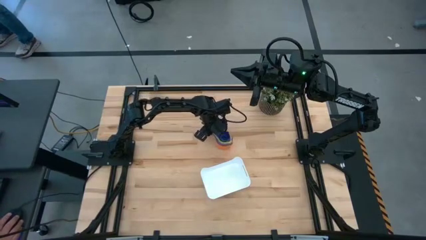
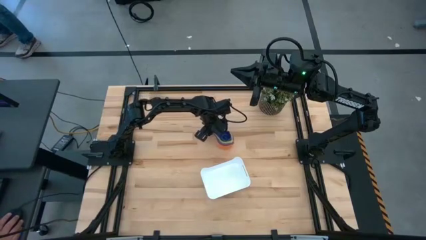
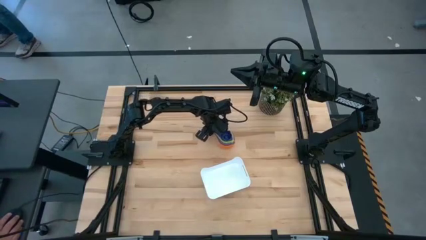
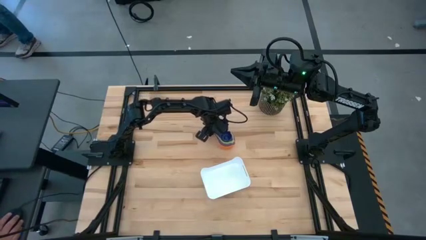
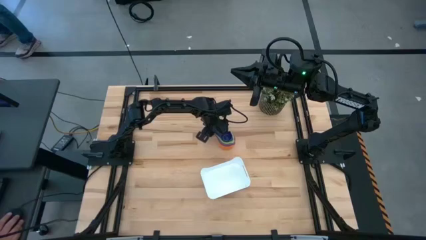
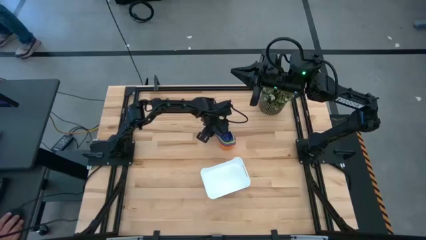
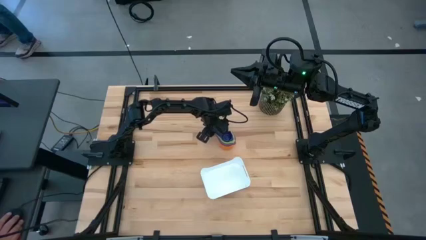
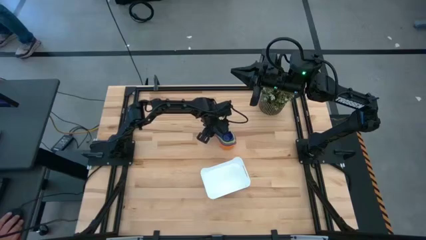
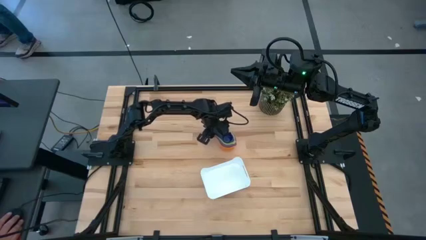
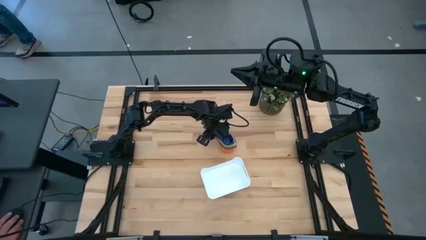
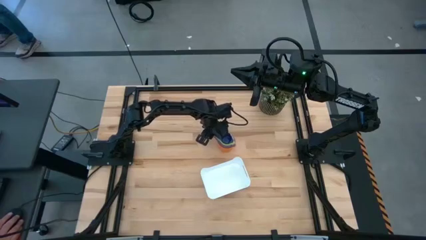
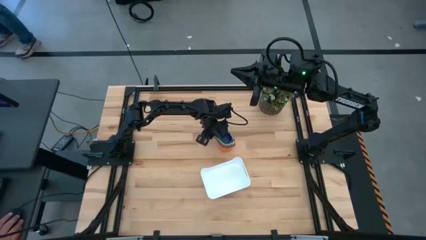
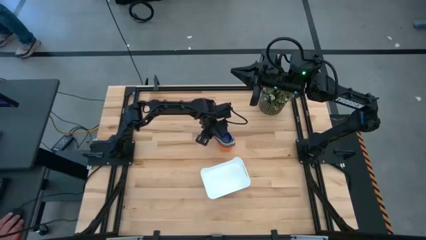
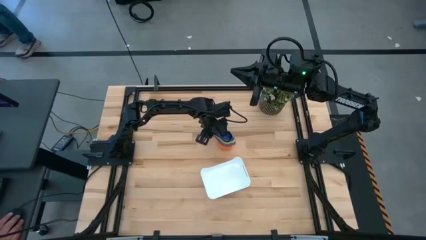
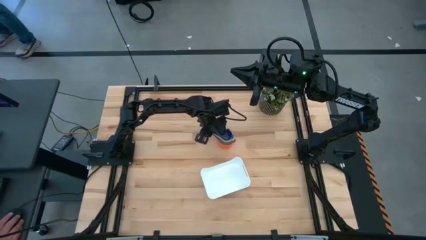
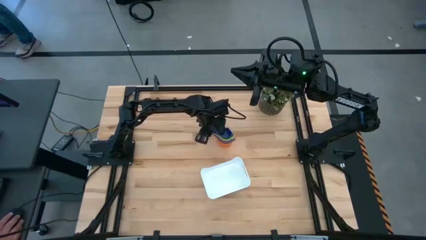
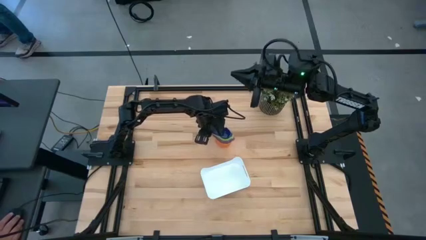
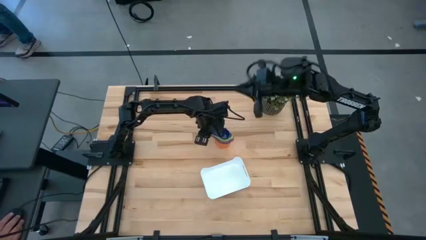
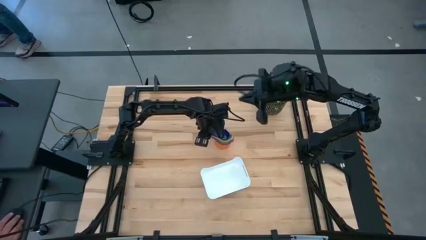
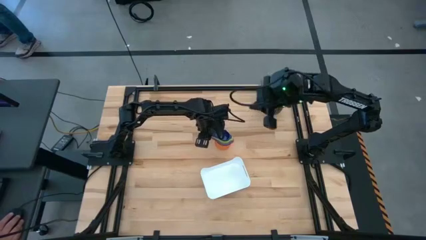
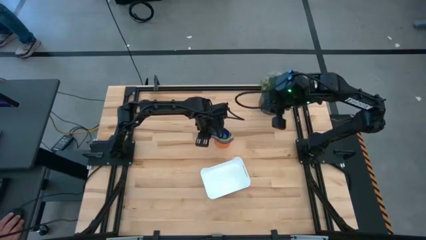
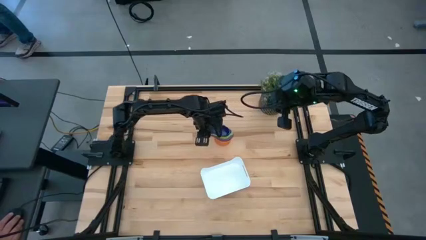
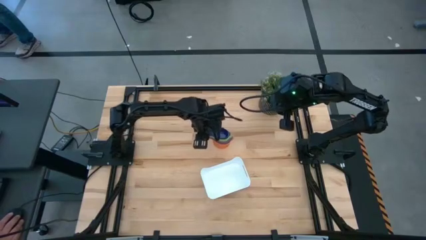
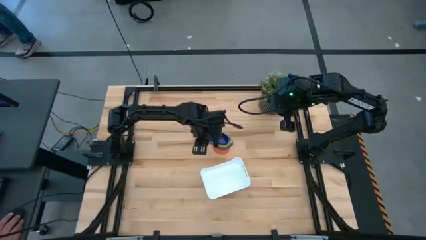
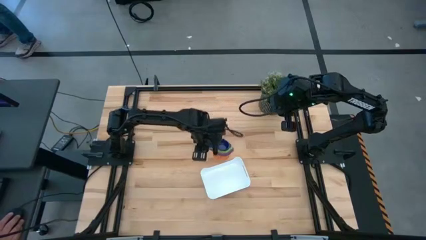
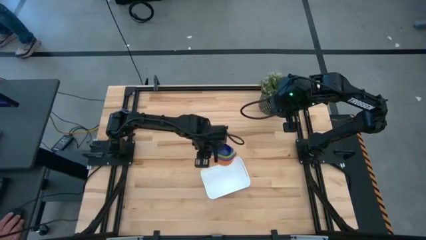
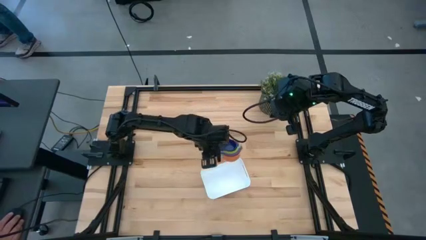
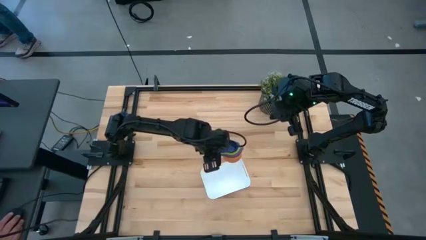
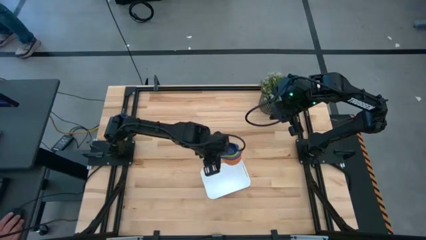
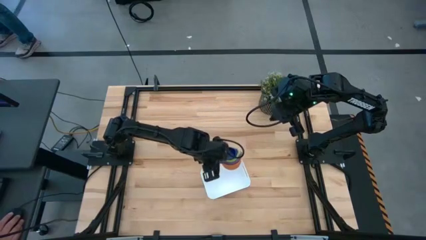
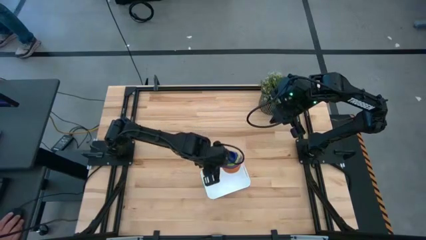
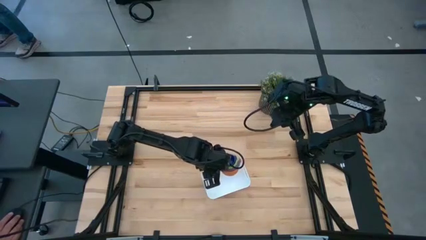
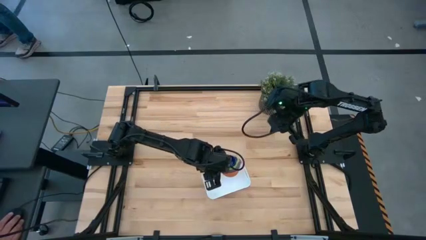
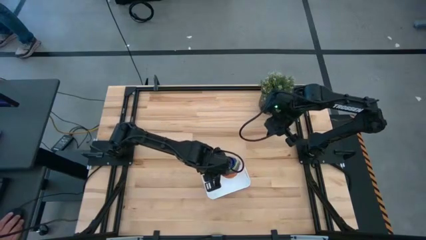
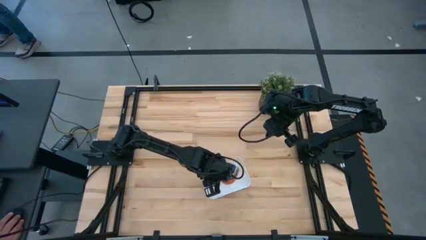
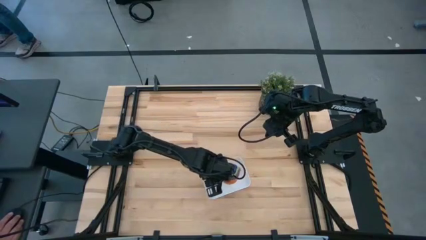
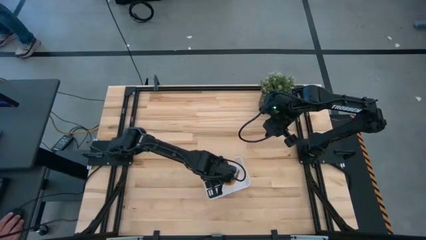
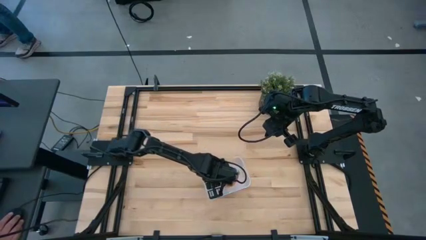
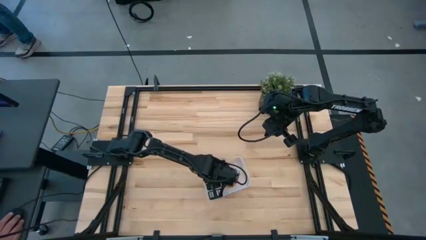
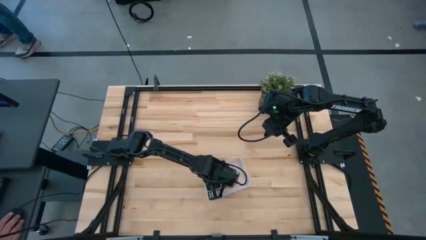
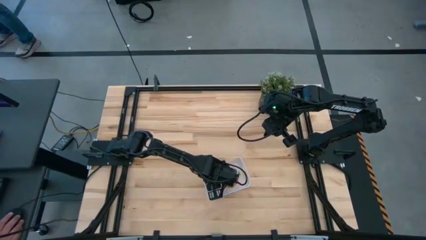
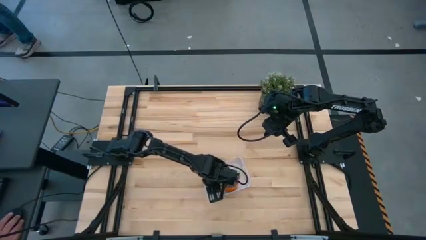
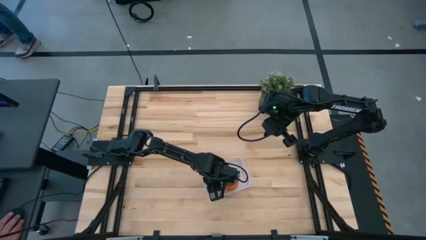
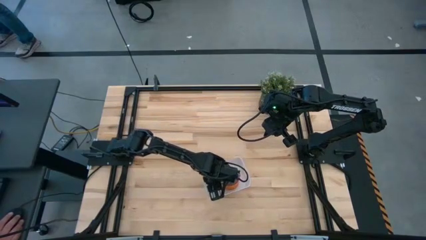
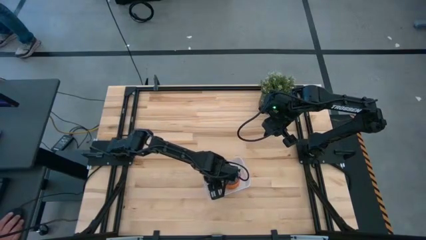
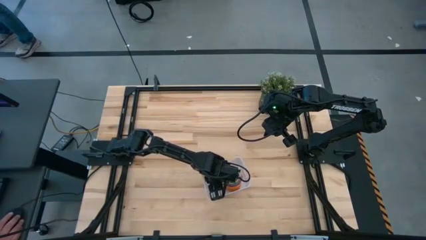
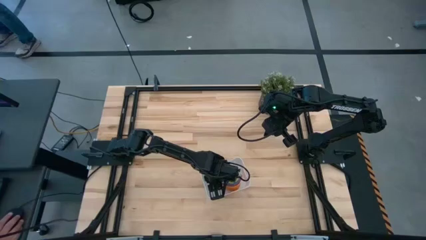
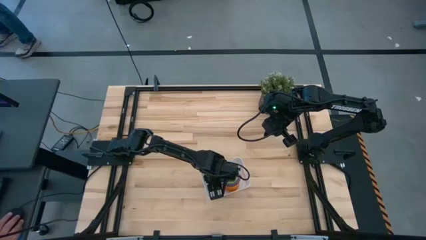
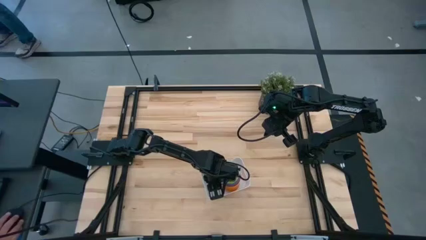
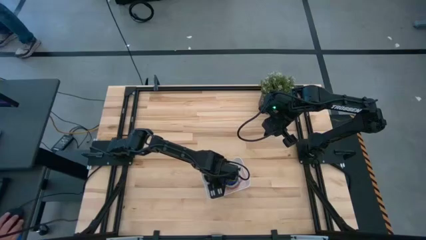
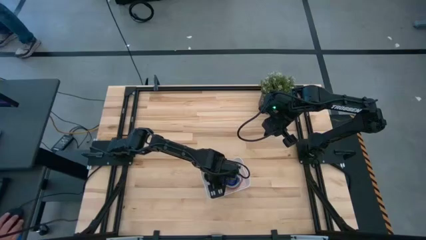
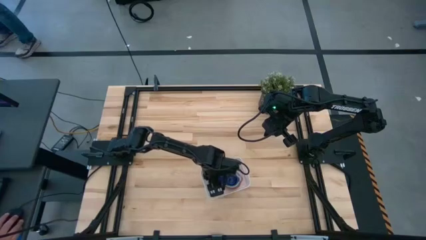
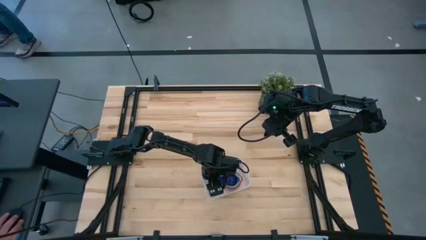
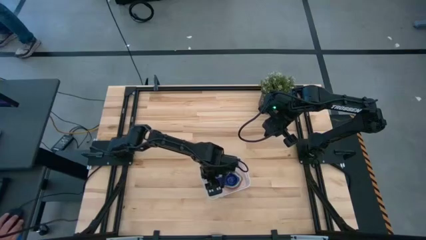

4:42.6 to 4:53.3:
Task: Nest measuring cups in basket
Put the nested measuring cups into the white bin

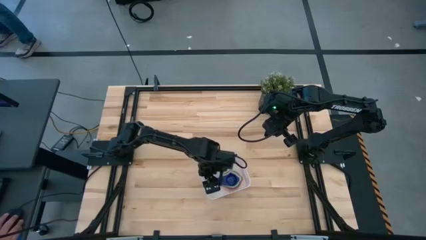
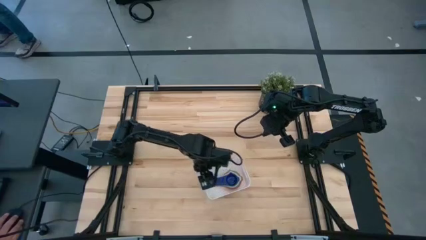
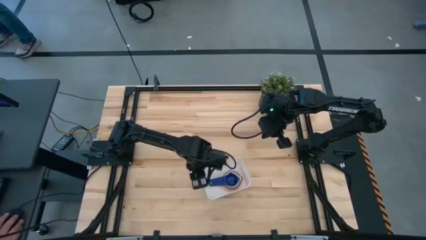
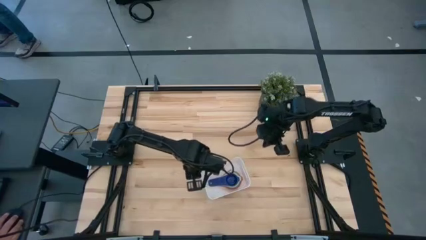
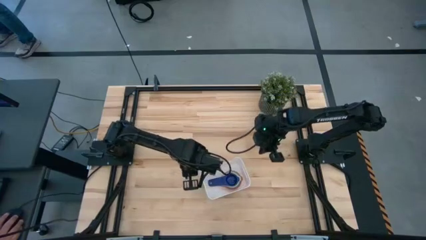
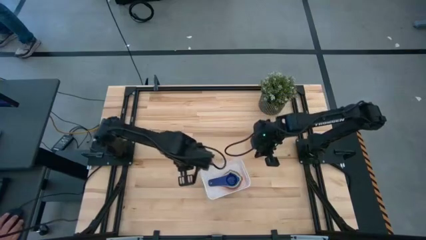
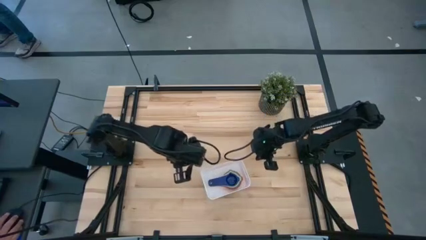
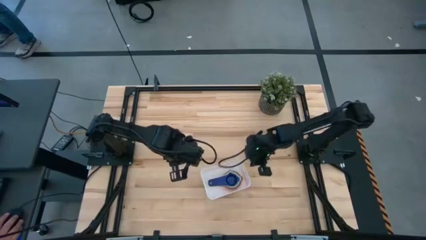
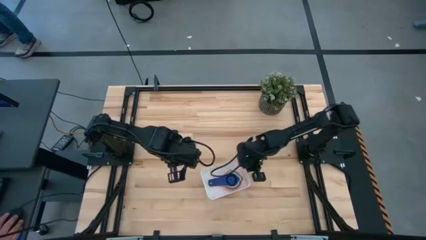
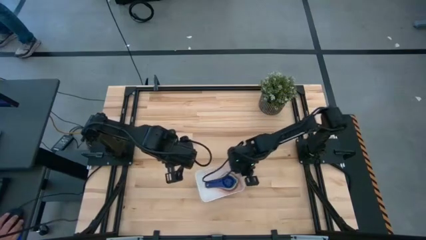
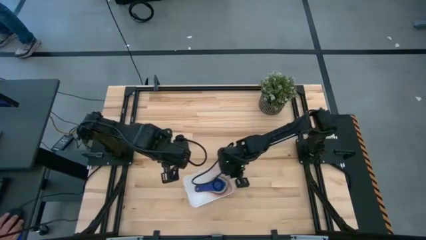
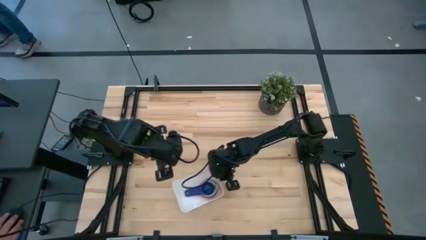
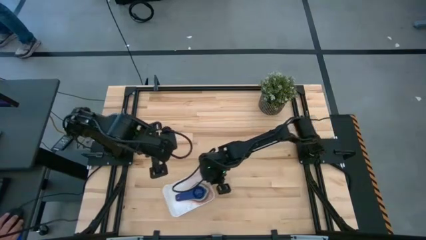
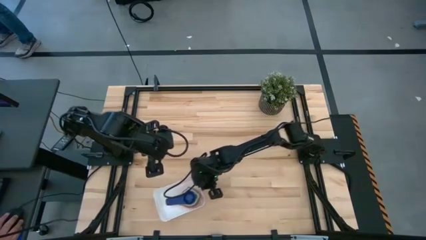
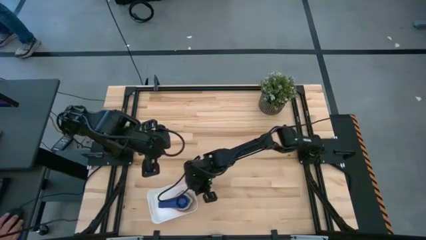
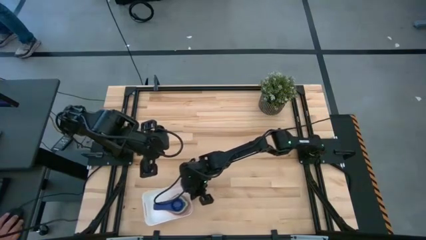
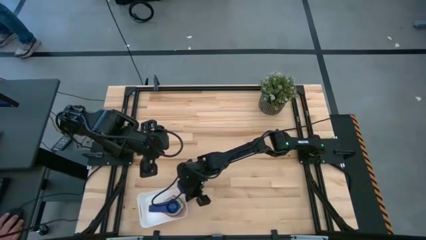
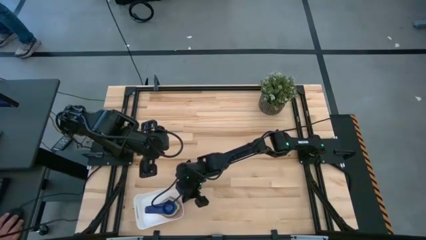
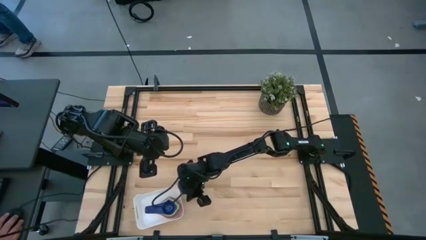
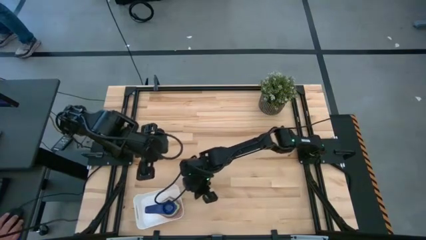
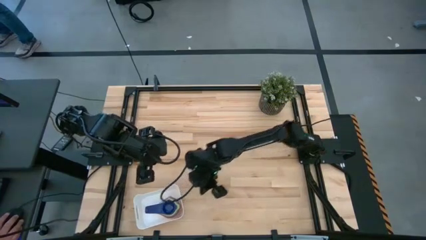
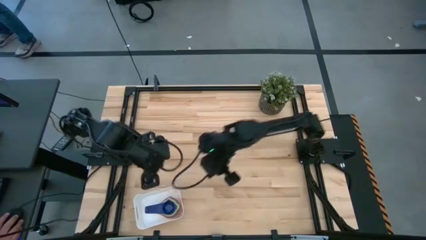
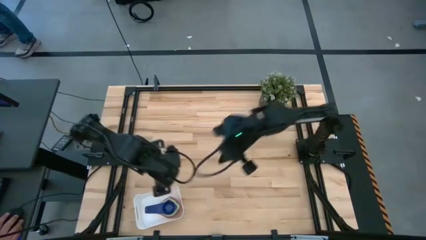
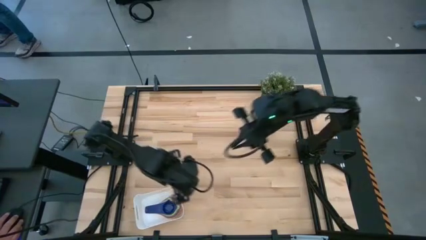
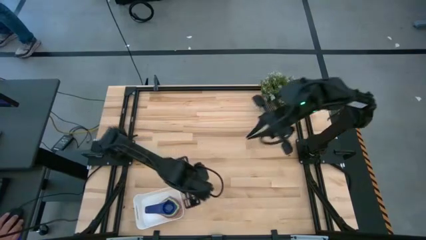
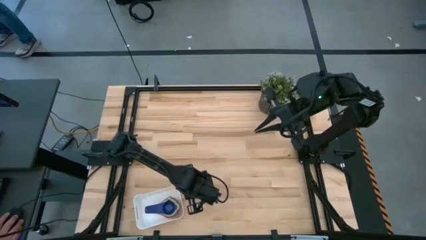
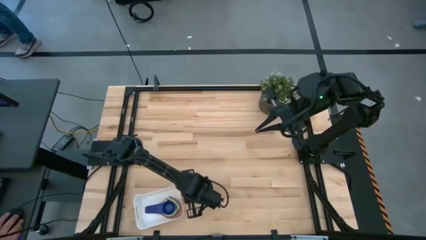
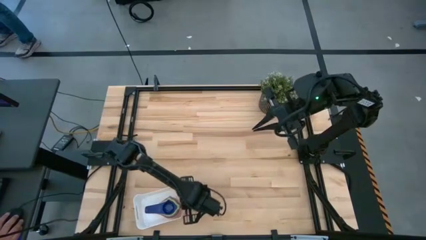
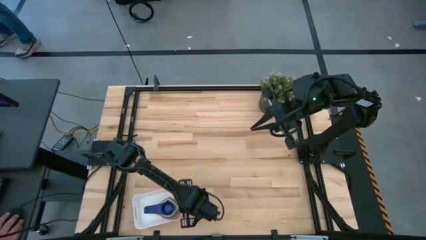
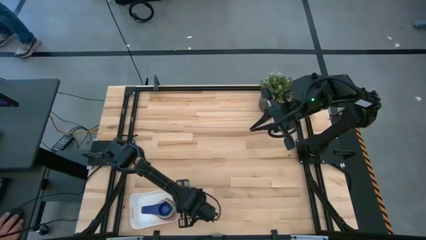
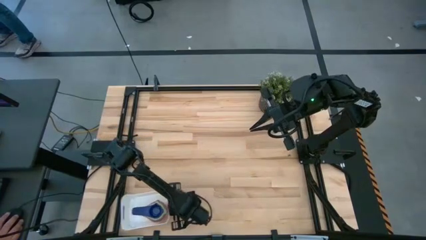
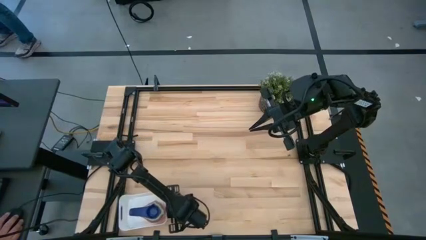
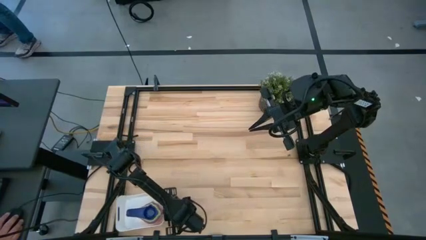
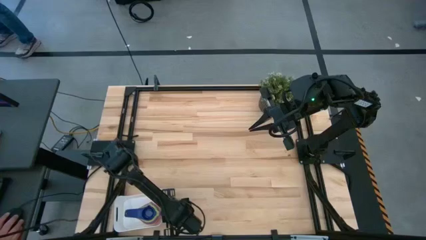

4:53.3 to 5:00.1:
Move the white bin to the bottom left corner of the table
